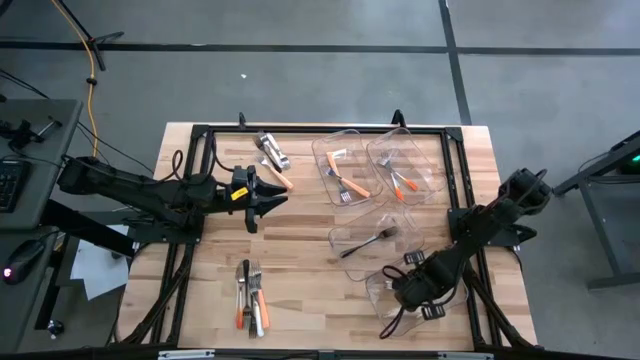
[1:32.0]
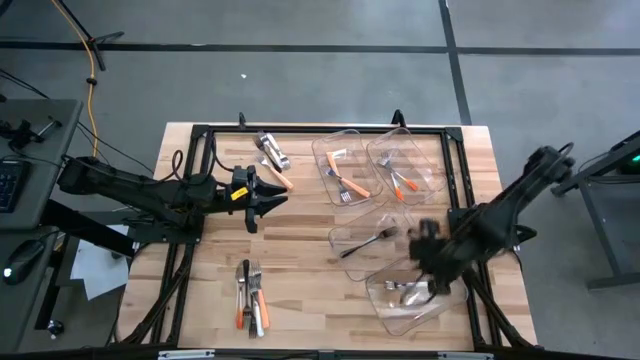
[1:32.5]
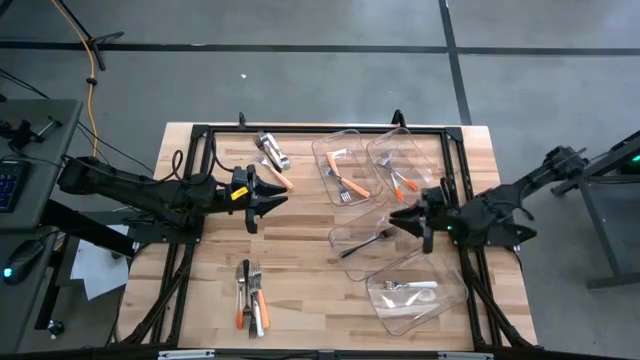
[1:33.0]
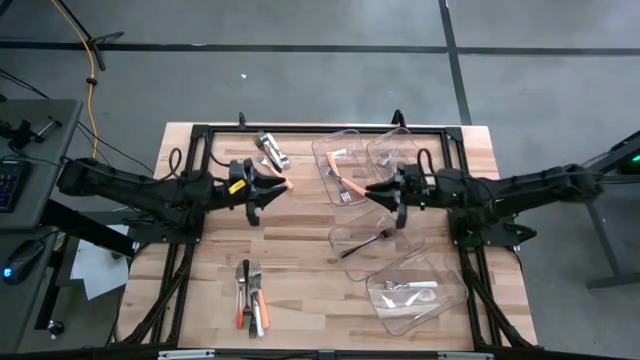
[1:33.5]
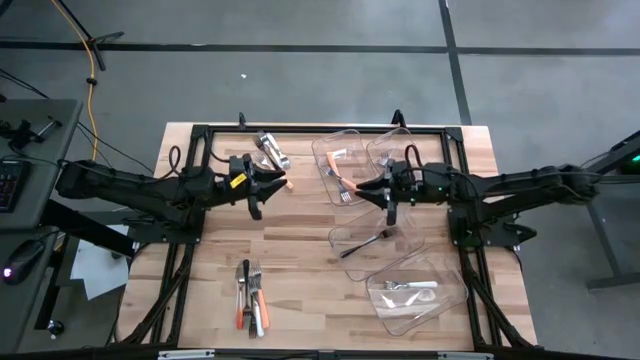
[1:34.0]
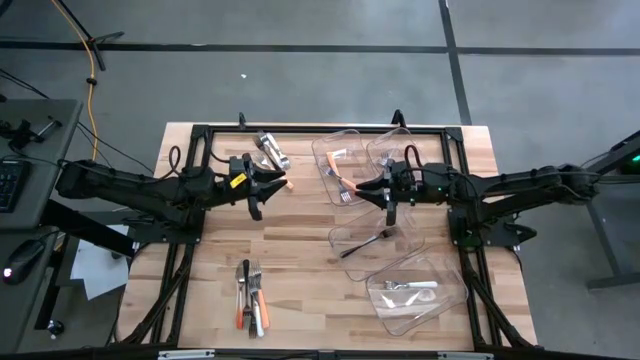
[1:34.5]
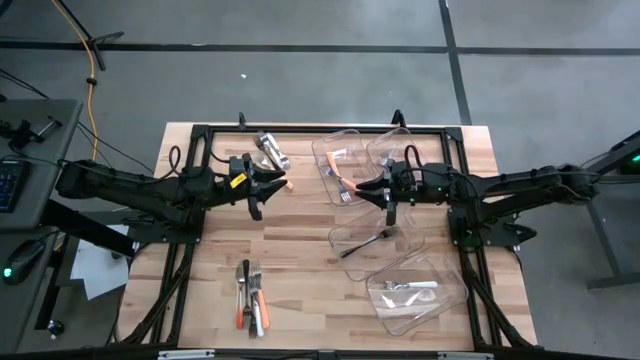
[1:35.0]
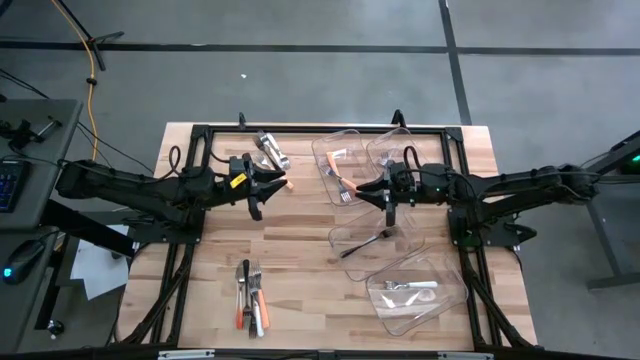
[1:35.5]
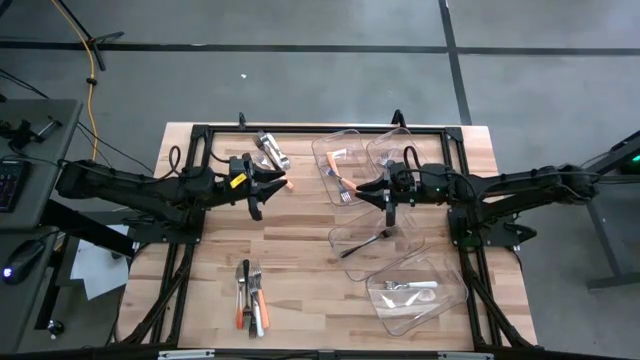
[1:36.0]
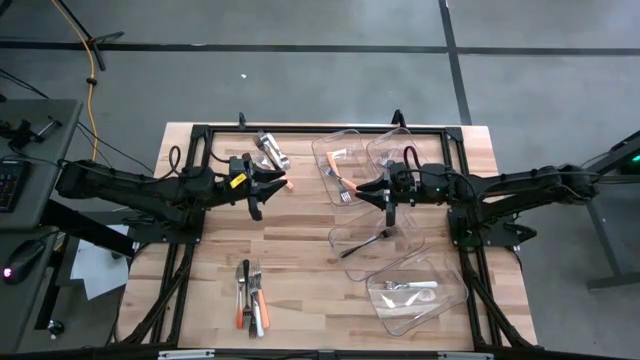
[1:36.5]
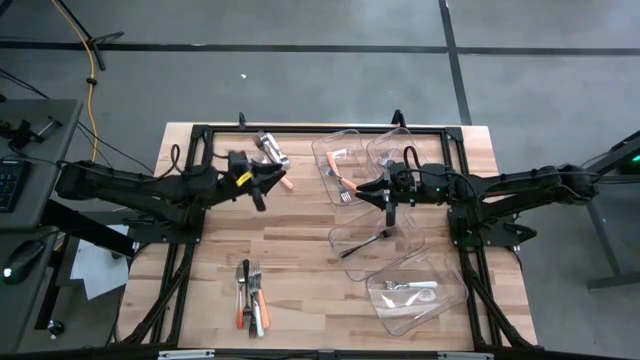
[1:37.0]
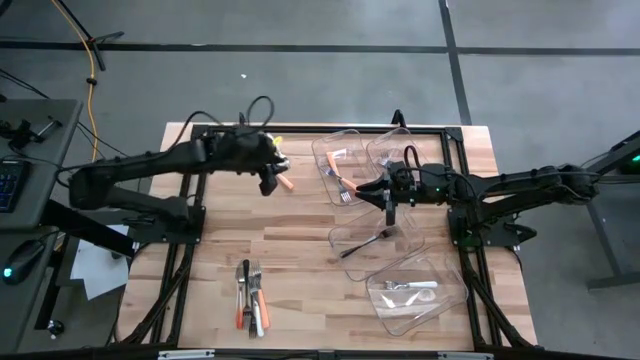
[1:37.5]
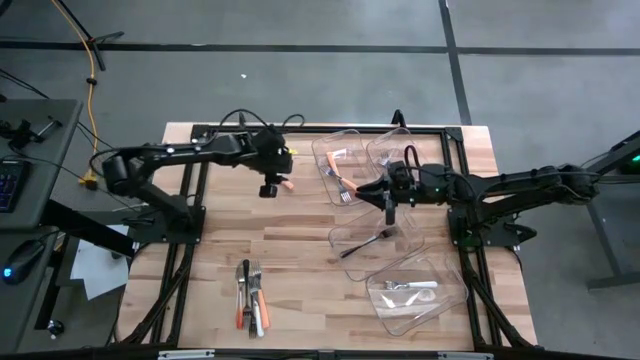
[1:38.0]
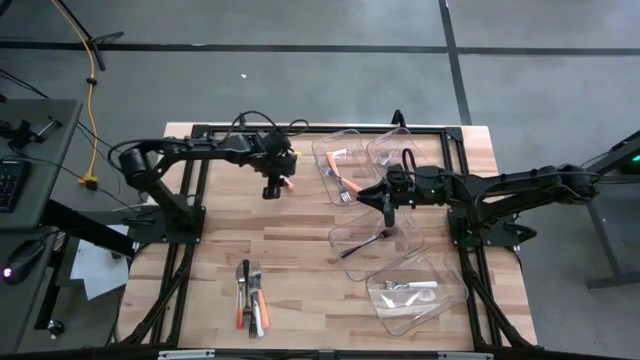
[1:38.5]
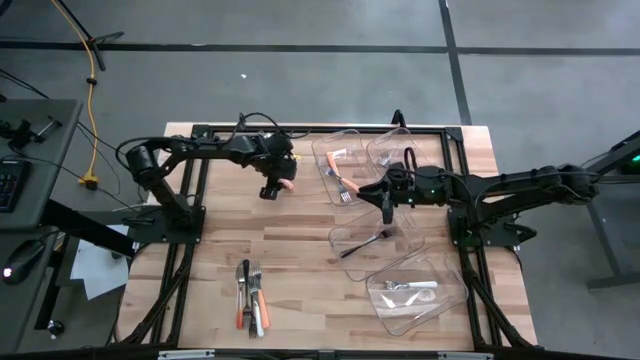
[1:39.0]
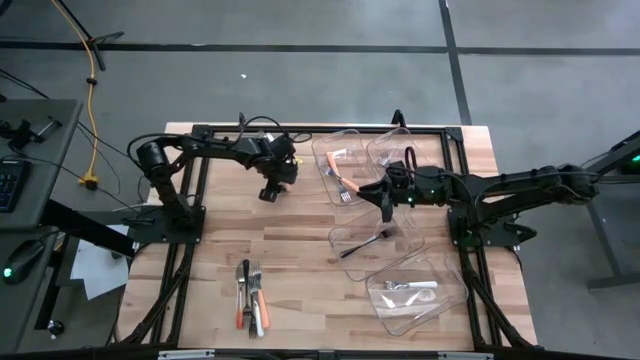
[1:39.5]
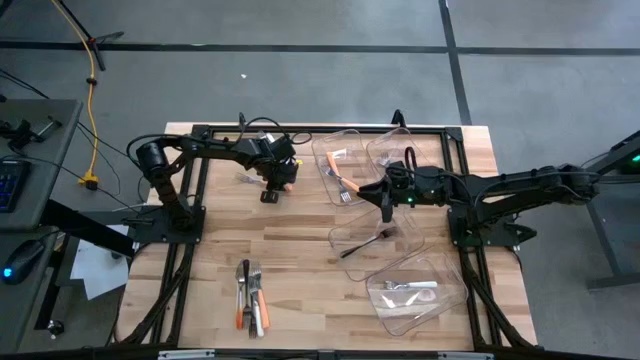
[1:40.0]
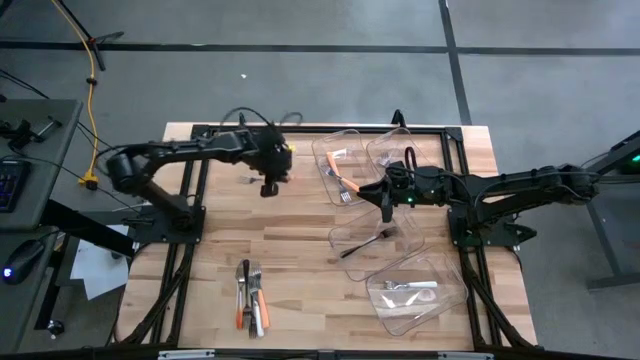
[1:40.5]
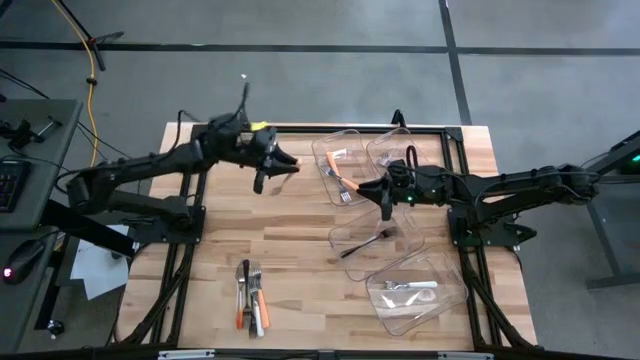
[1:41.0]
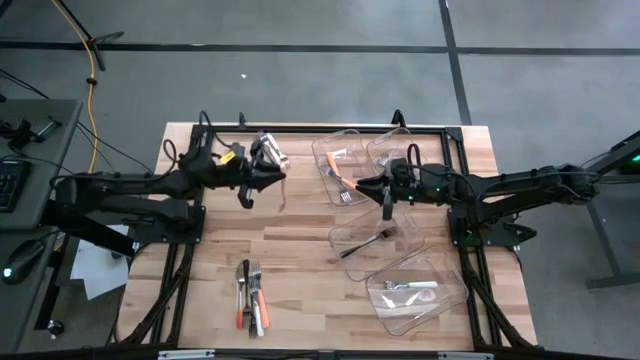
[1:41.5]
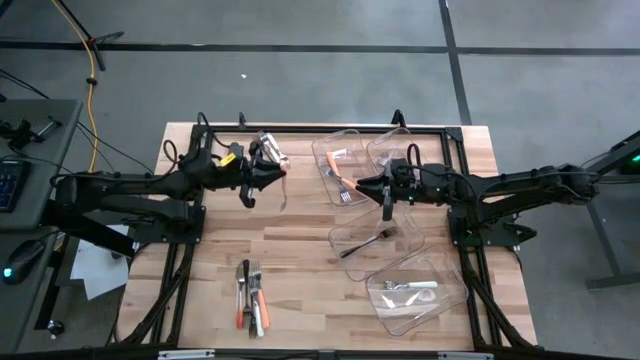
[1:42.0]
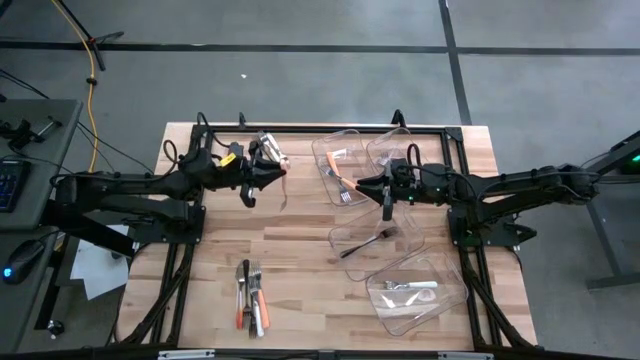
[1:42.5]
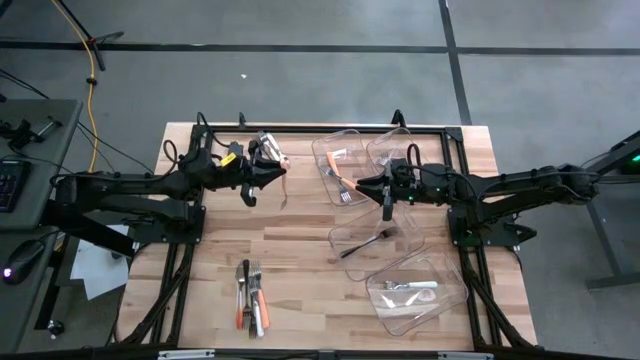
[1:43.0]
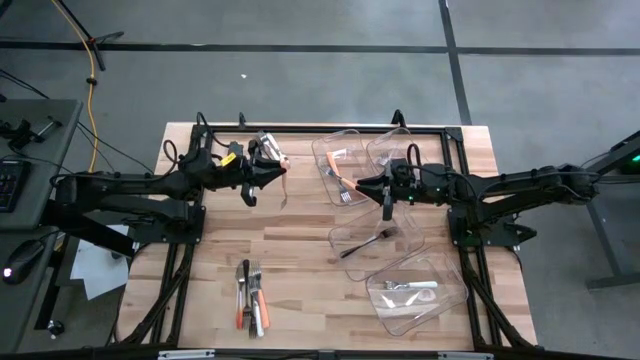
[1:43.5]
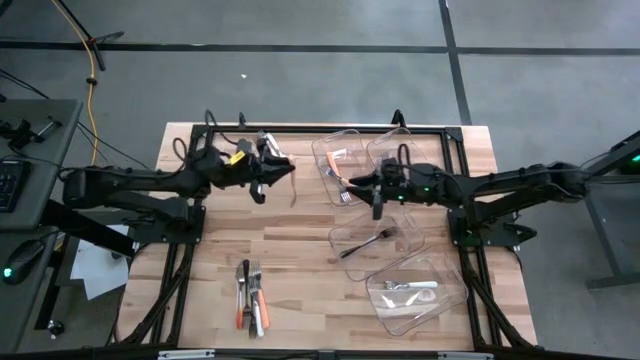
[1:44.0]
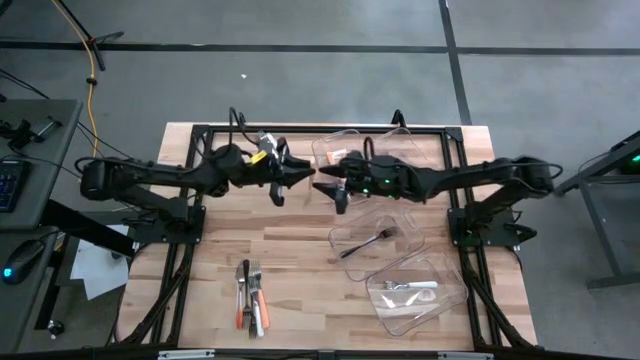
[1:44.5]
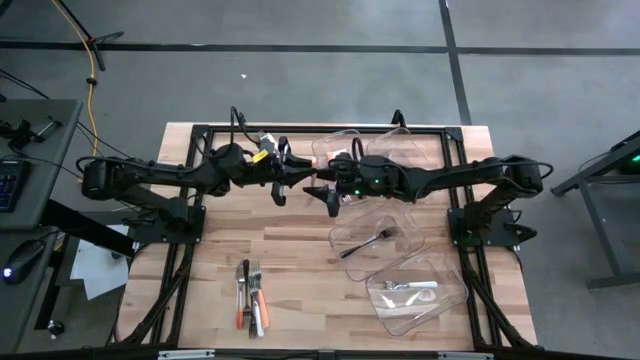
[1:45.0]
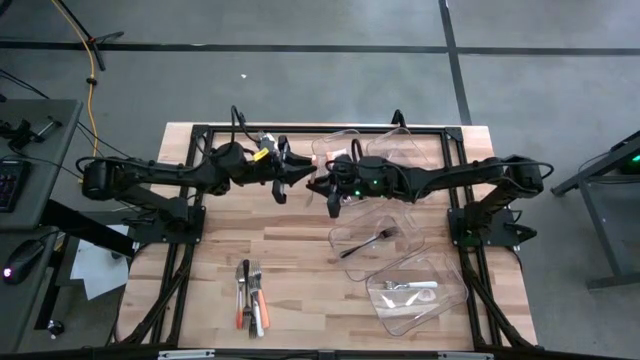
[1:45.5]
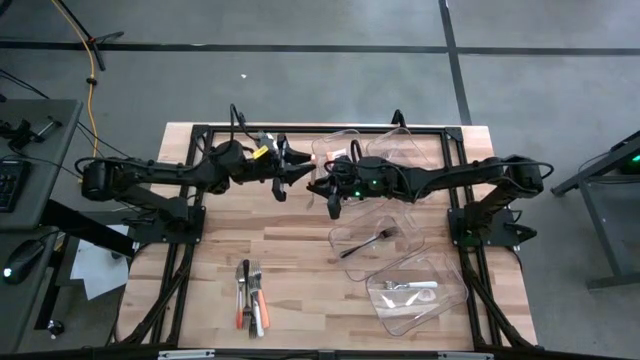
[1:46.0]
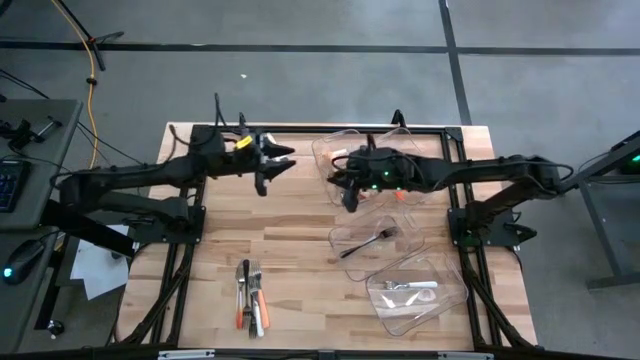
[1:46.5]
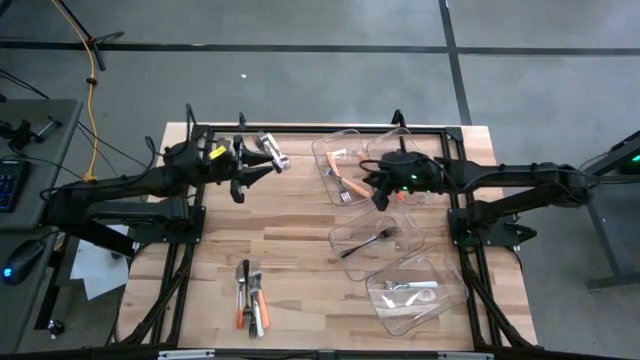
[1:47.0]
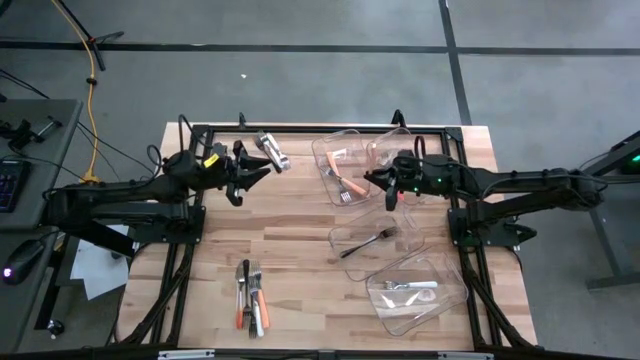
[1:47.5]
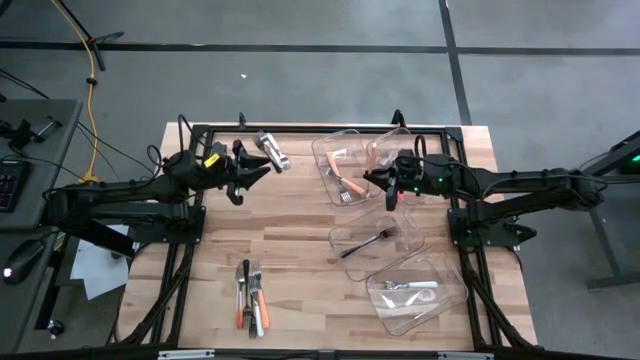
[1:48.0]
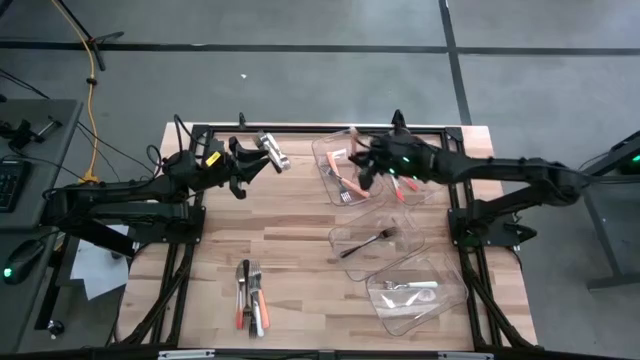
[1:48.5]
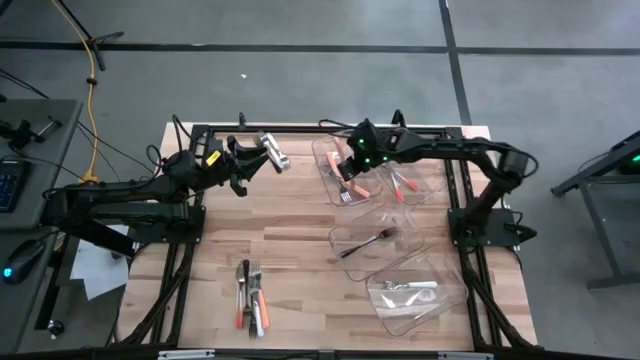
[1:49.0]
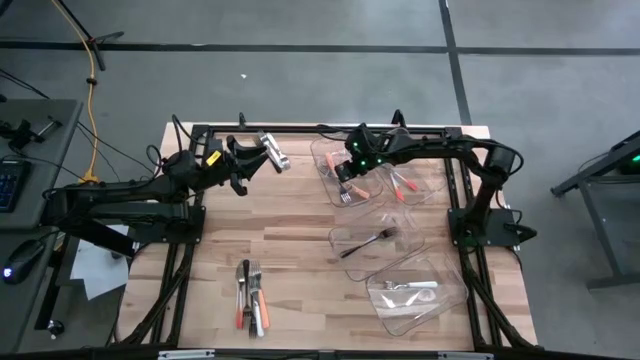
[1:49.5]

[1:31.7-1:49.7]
Task: Sort silverware by color (type)
Put the light orange fork into the left transparent bin

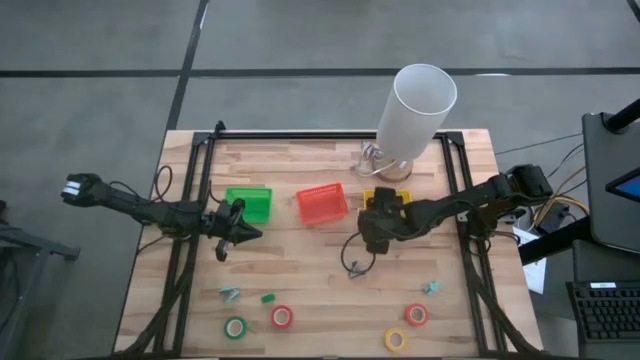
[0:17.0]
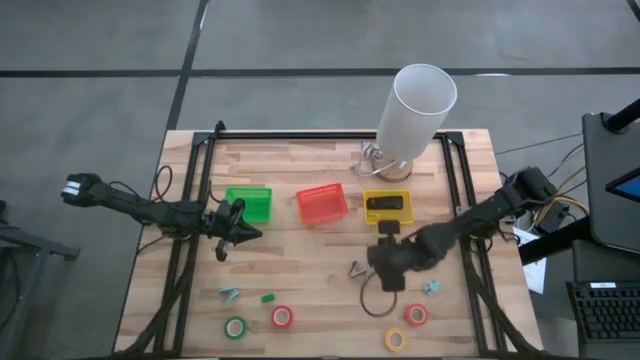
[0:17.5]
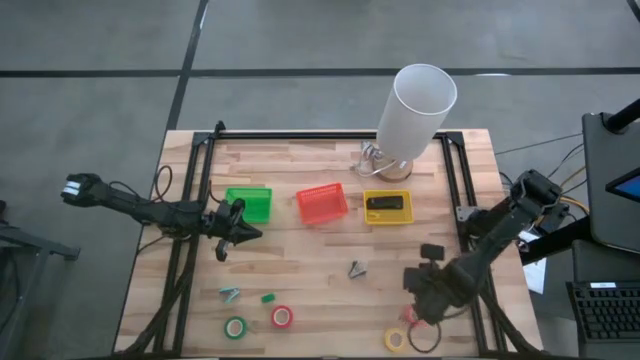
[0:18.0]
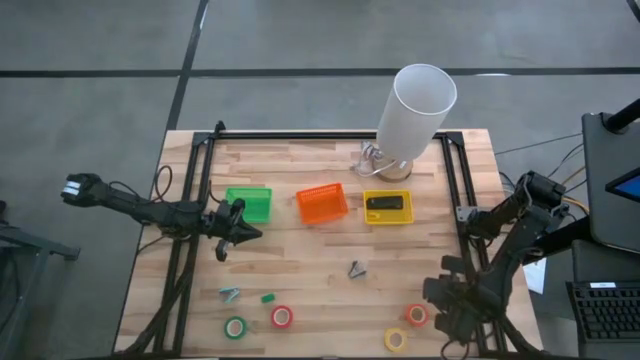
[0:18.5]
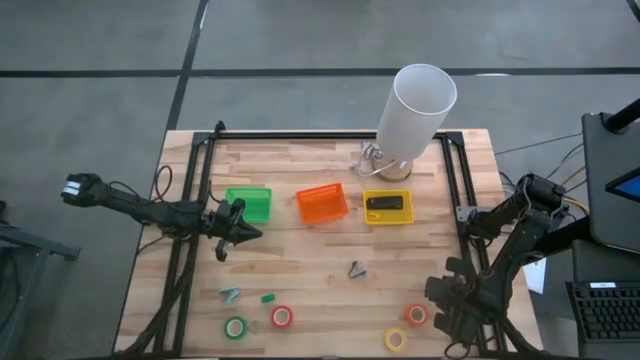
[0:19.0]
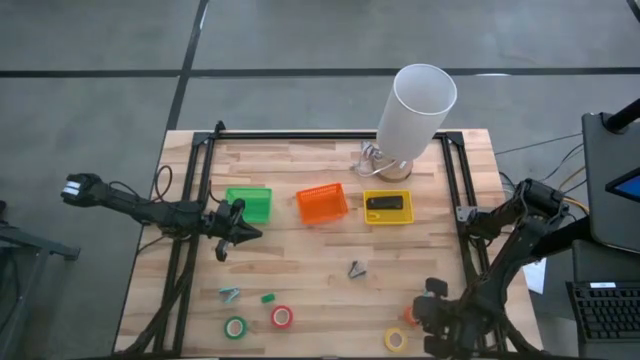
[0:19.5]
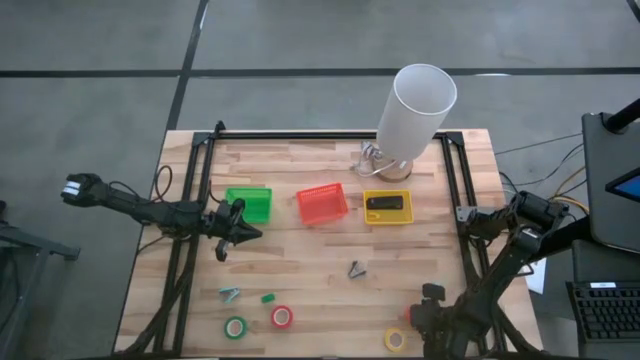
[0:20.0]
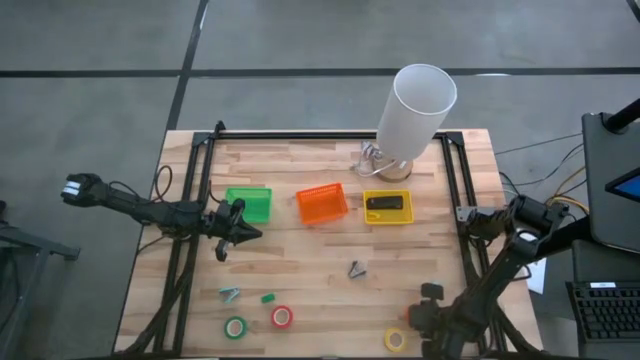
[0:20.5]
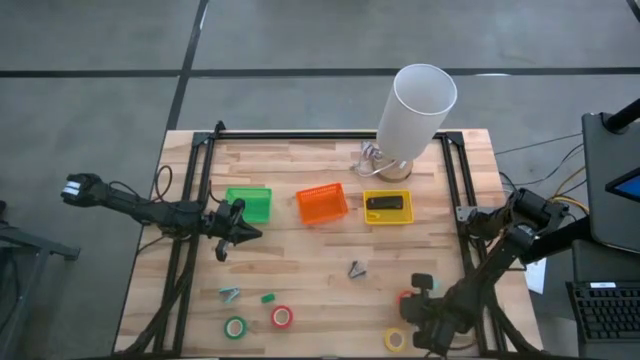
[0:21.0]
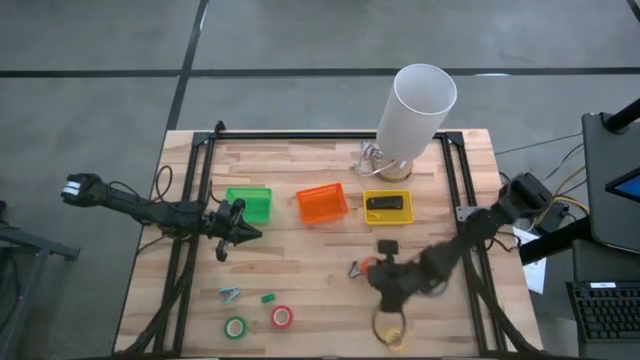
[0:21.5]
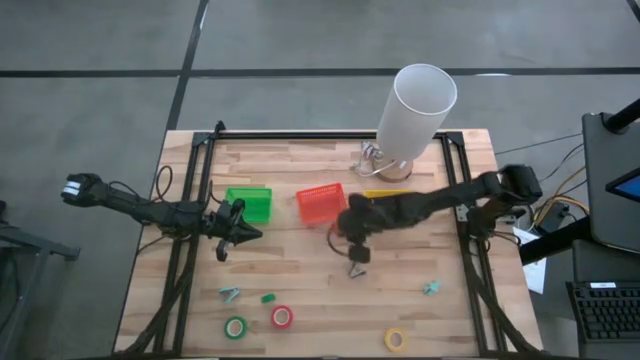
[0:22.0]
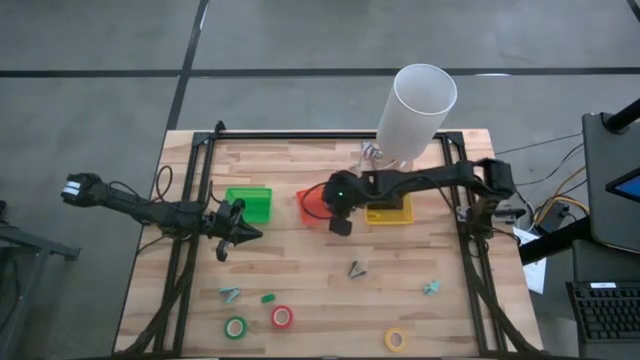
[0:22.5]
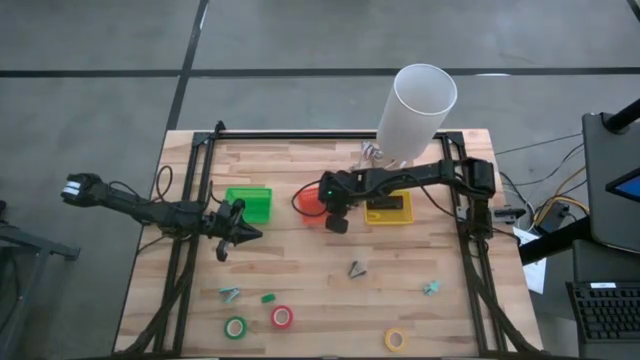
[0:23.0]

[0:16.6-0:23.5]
Task: Pick and place Stapler, Stapler remover, tape
Put the orange tape into the orange basket
